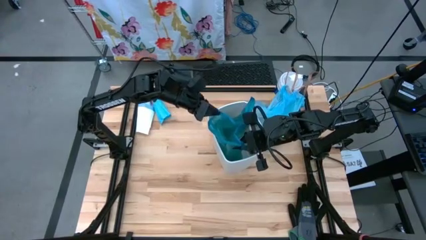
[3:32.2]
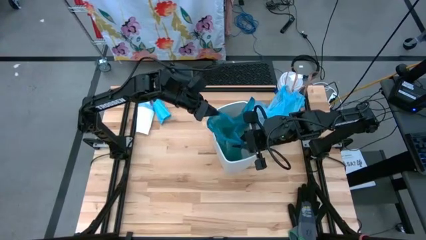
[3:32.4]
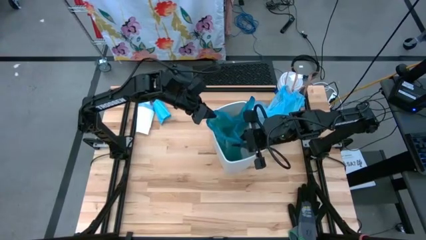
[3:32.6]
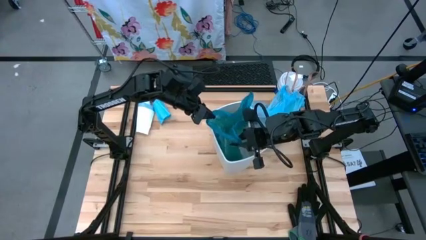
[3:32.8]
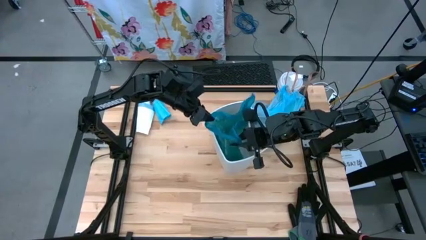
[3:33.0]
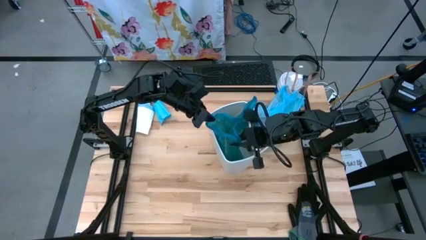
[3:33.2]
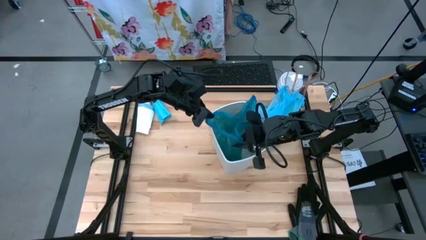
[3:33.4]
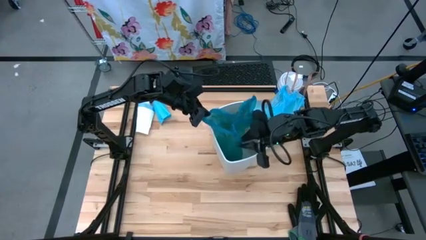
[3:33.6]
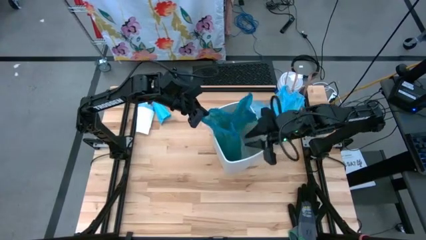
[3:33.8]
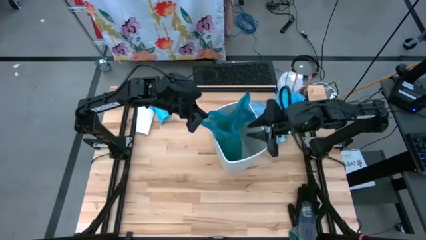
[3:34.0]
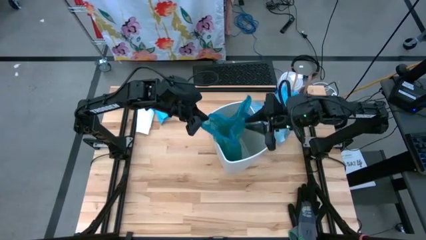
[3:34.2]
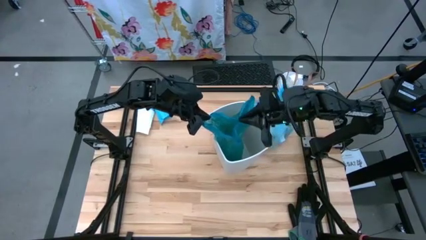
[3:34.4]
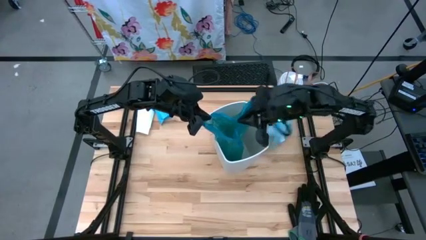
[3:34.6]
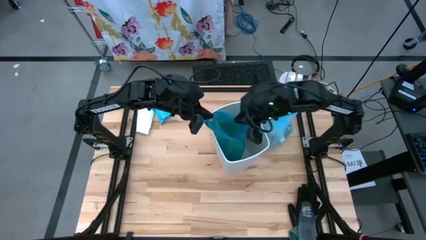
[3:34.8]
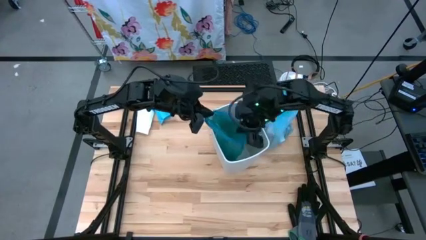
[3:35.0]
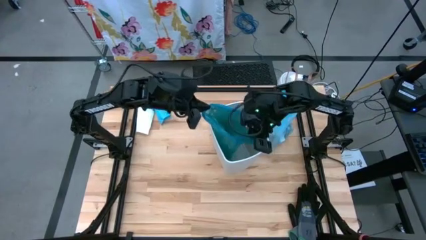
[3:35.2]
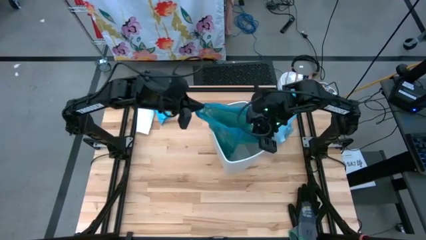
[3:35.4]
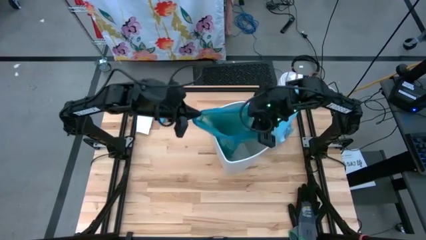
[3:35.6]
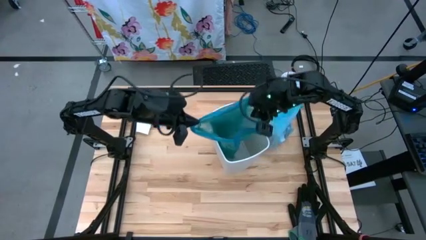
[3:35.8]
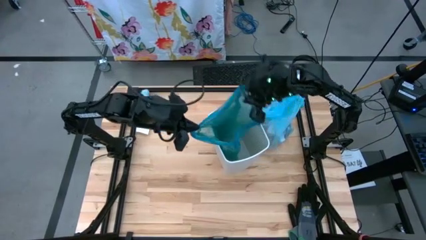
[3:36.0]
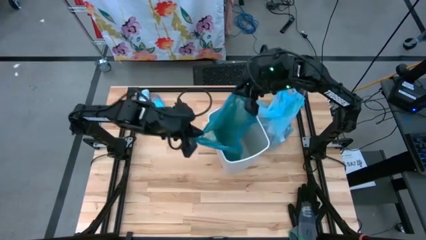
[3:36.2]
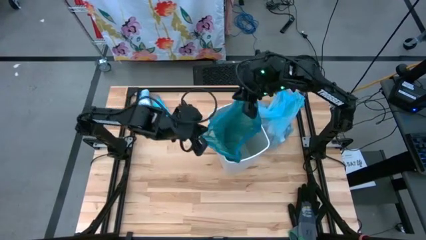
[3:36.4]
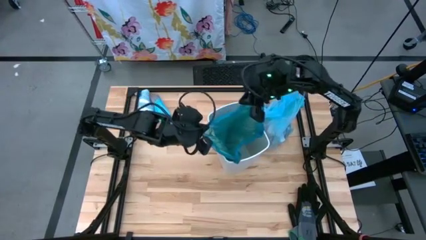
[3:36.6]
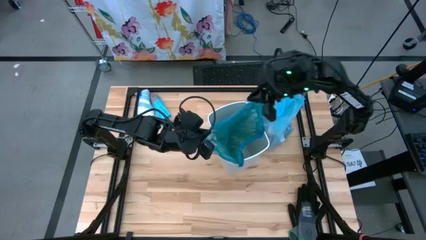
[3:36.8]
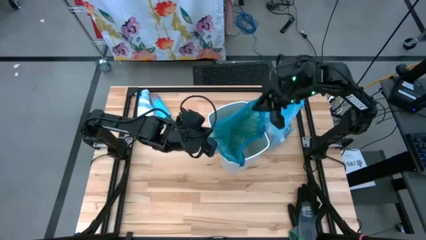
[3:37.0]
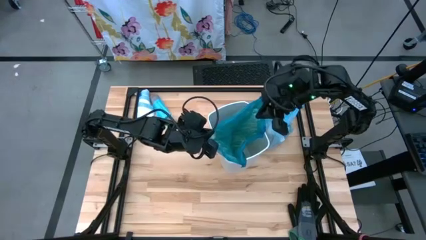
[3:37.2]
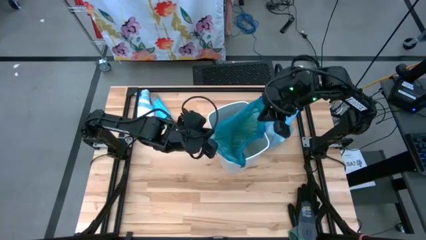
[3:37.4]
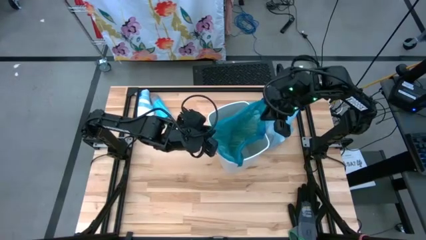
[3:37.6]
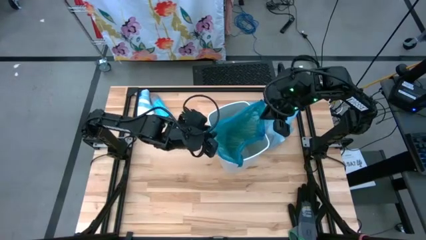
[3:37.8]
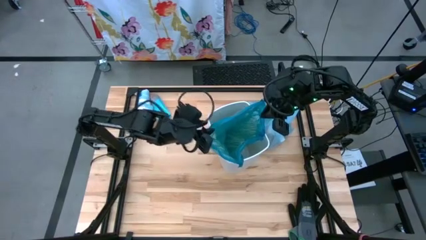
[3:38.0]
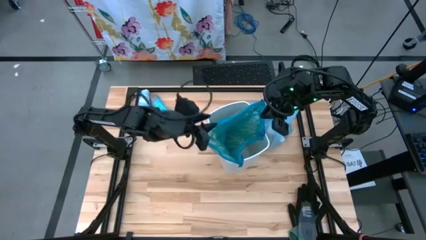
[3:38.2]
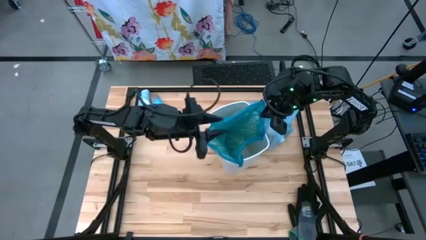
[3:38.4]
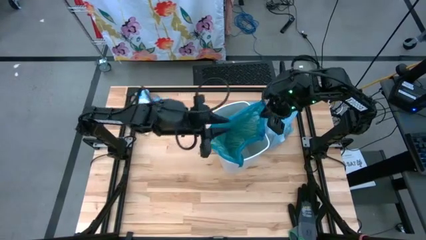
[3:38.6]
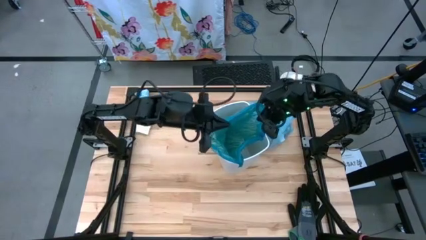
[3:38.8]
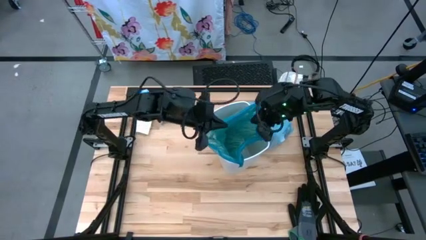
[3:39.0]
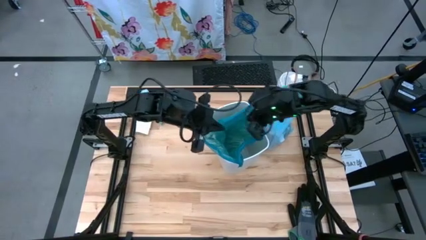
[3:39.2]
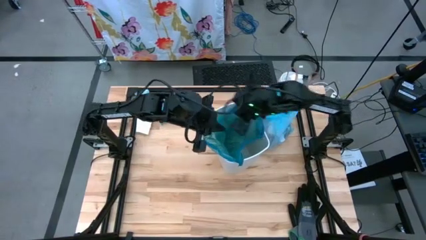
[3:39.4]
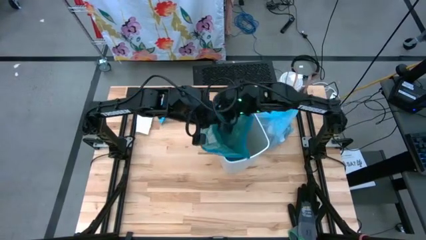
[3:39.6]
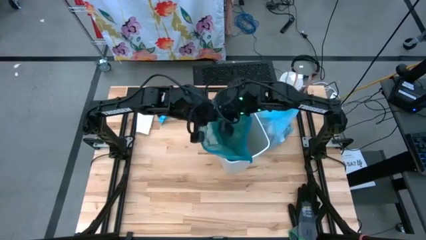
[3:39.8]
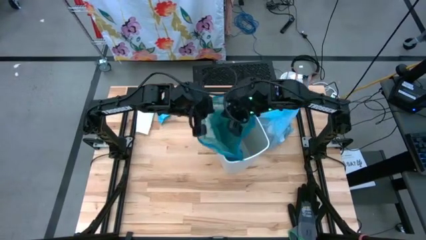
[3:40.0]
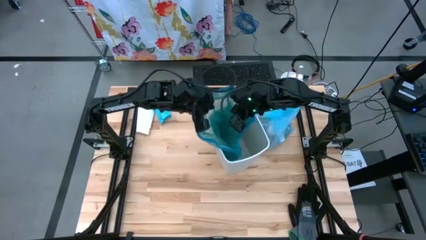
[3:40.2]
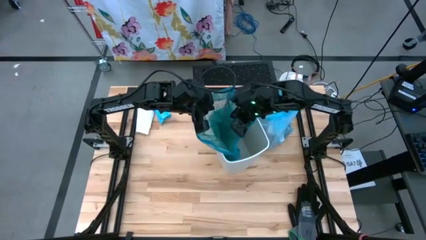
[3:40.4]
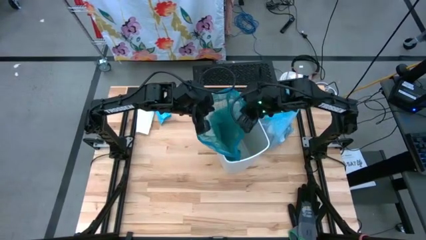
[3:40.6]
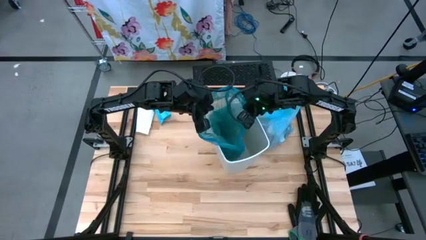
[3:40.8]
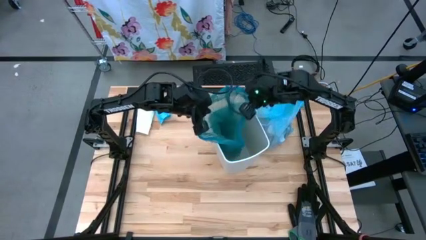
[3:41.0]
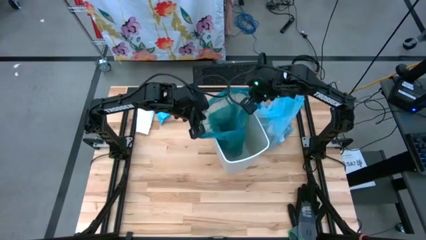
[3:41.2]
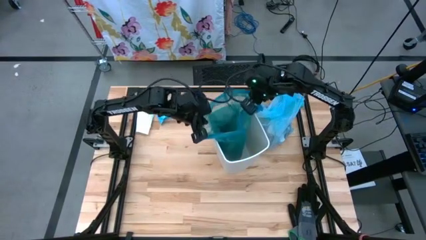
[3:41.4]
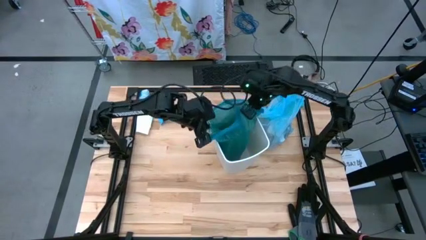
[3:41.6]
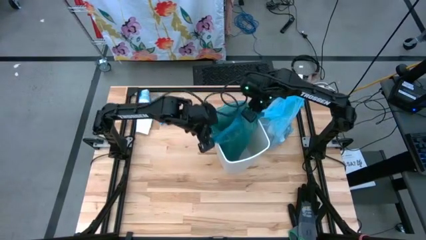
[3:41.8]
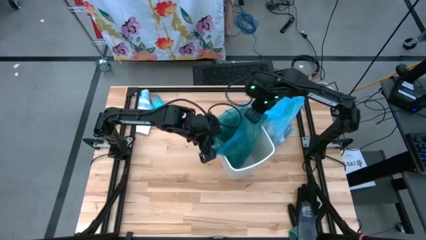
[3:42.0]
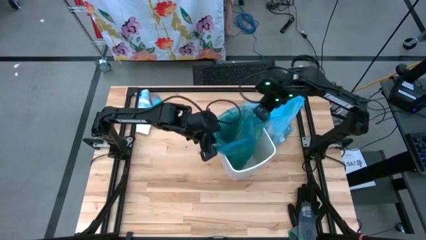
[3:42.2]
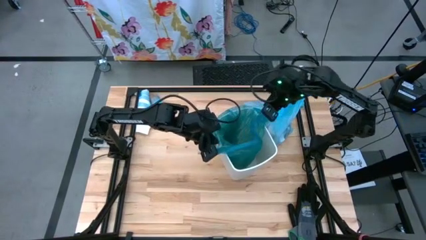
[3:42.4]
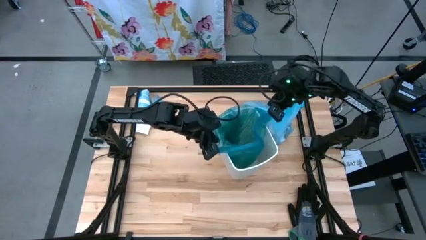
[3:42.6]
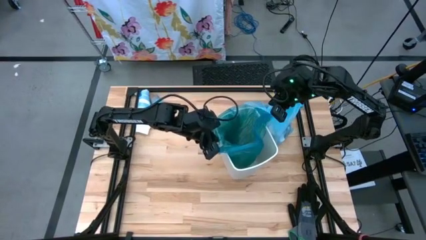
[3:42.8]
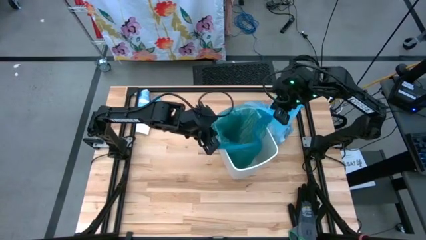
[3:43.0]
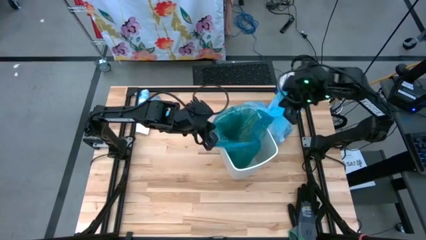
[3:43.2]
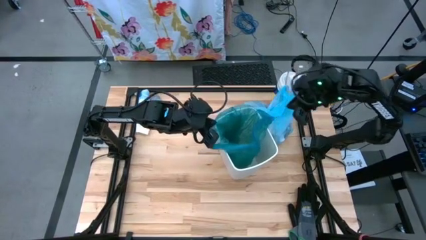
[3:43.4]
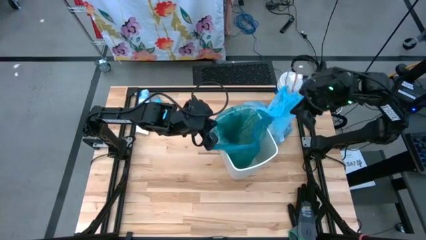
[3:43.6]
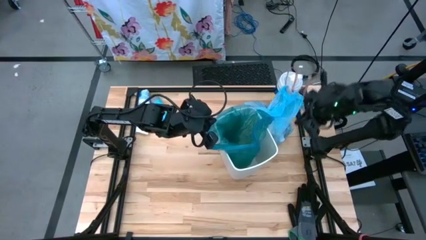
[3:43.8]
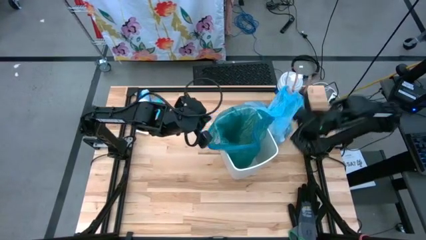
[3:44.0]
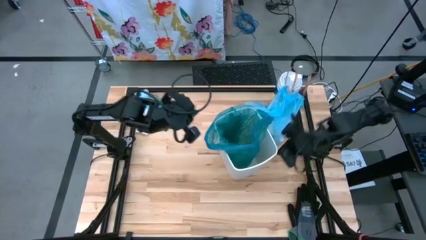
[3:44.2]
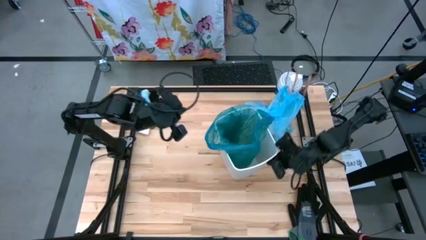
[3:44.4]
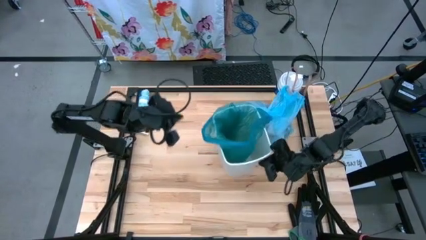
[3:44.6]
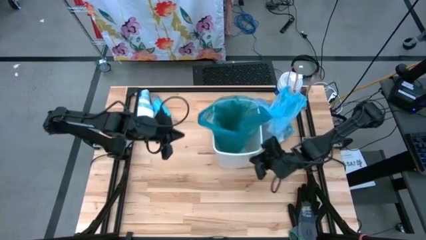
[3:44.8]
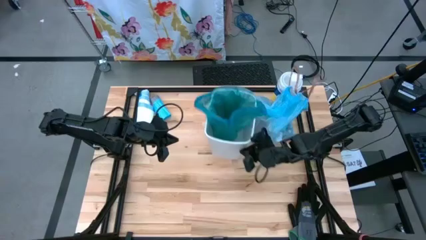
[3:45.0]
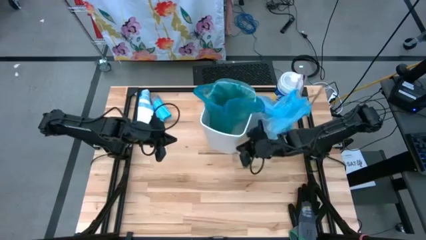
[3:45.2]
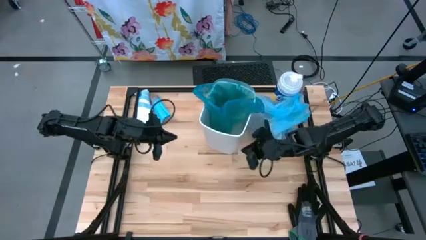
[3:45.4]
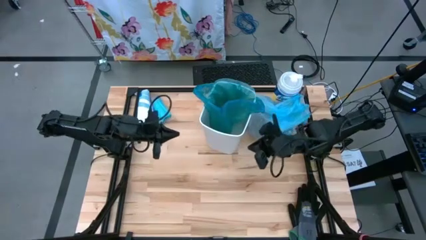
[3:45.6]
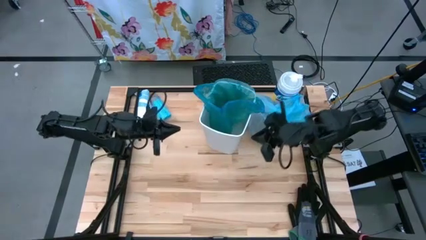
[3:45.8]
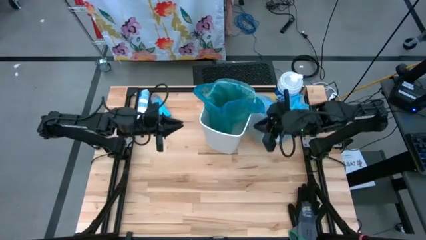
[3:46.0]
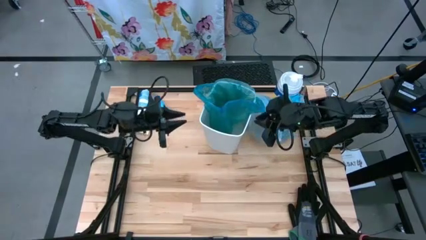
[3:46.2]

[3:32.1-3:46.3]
Task: place trash/remove bag and relplace
Put the blue trash bag into the trash bin
